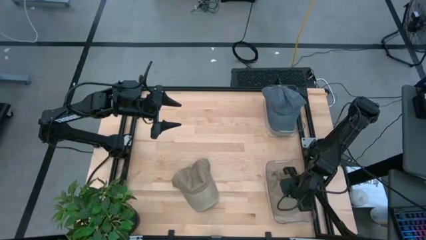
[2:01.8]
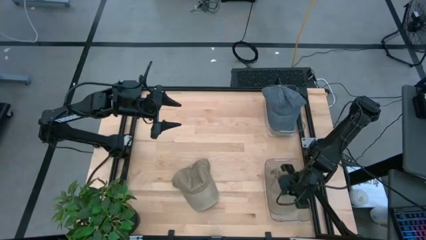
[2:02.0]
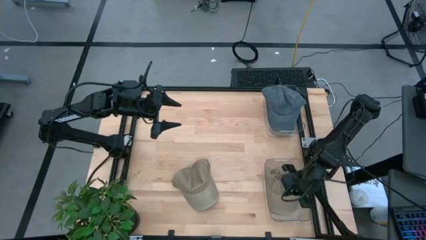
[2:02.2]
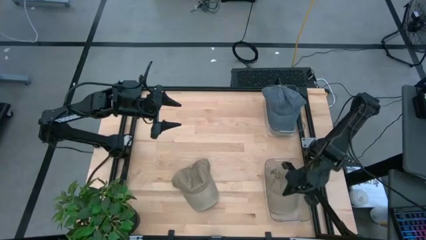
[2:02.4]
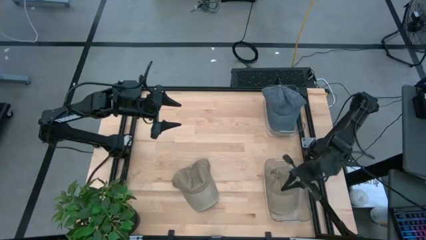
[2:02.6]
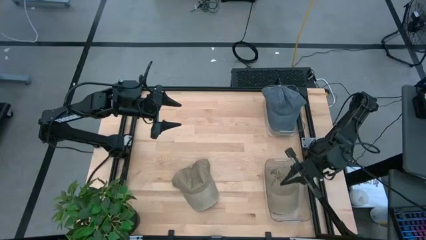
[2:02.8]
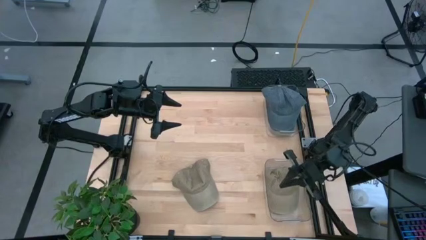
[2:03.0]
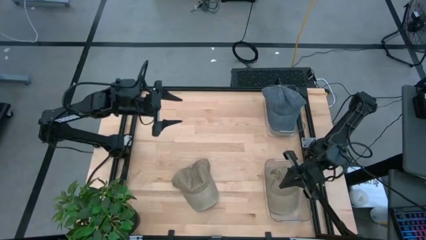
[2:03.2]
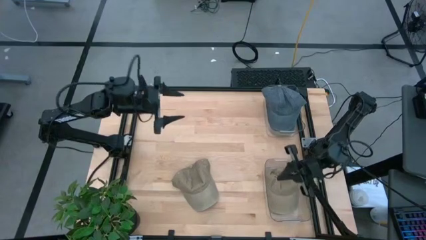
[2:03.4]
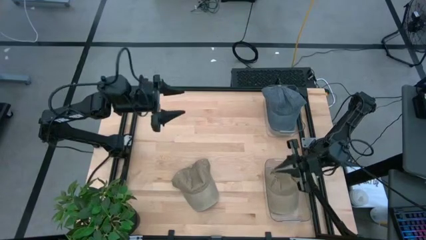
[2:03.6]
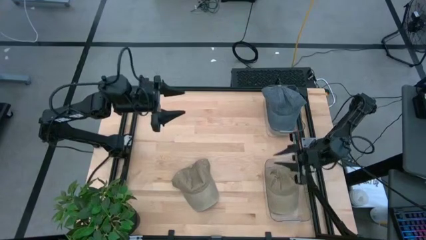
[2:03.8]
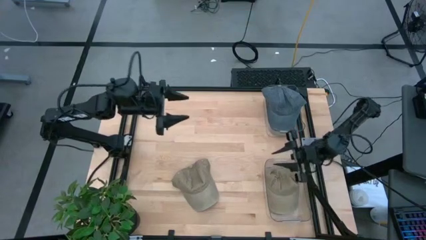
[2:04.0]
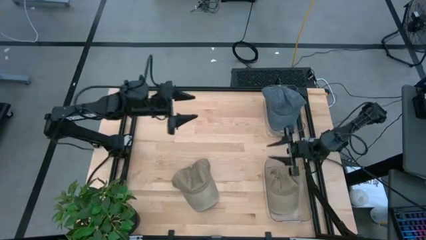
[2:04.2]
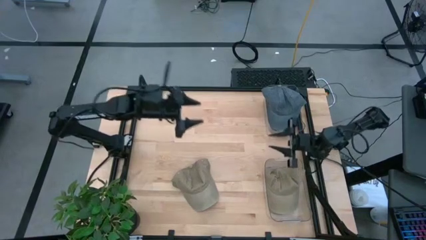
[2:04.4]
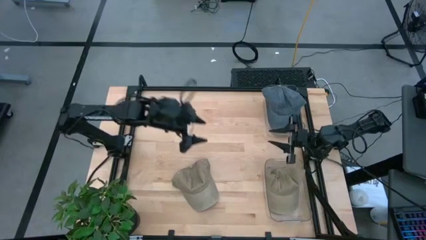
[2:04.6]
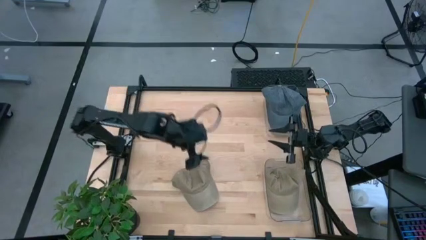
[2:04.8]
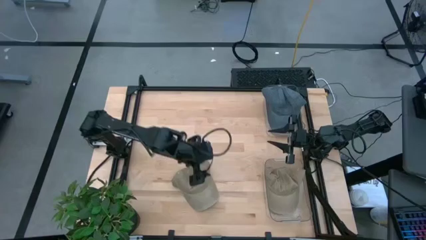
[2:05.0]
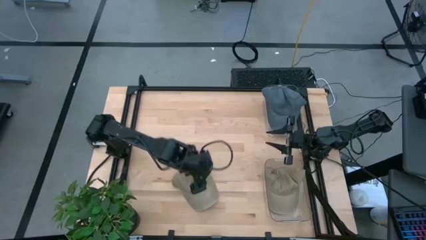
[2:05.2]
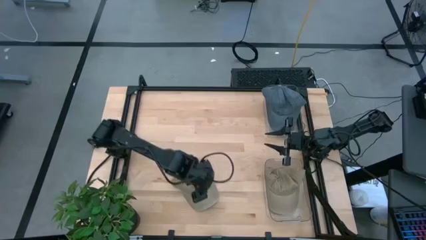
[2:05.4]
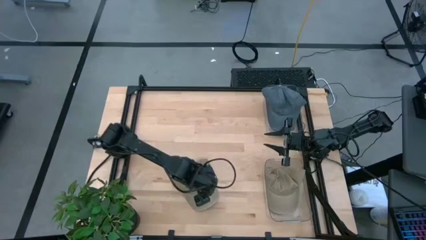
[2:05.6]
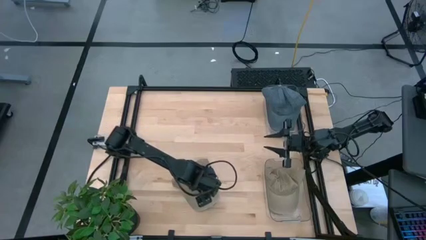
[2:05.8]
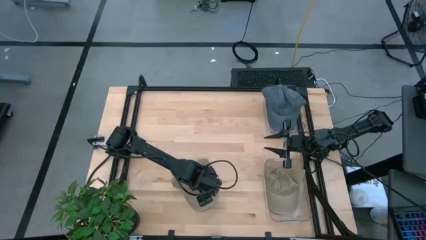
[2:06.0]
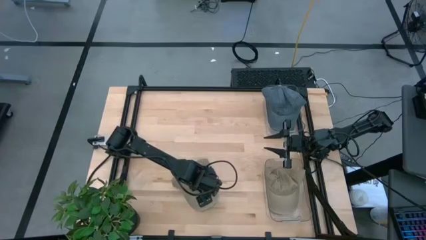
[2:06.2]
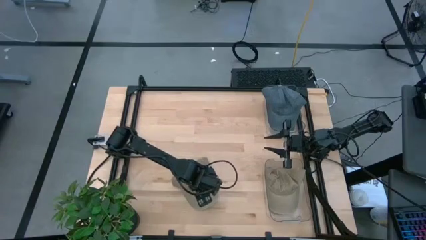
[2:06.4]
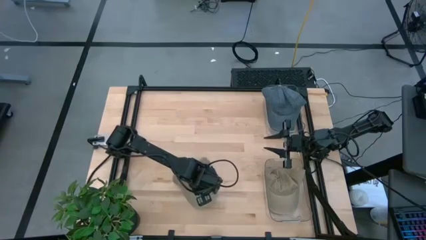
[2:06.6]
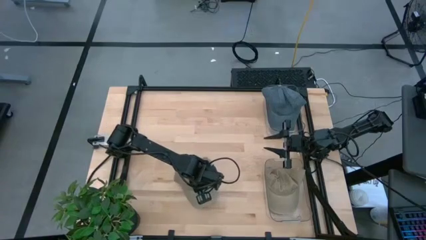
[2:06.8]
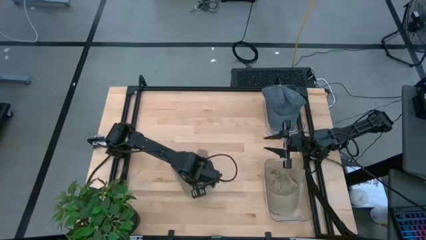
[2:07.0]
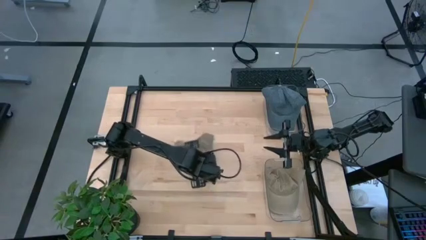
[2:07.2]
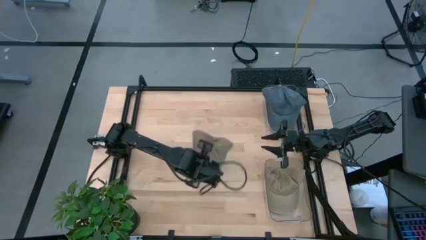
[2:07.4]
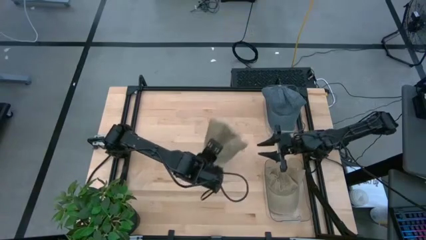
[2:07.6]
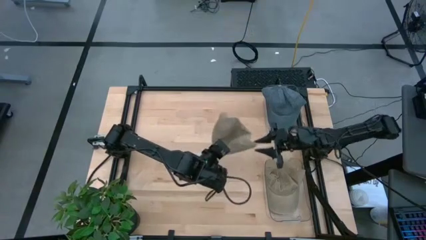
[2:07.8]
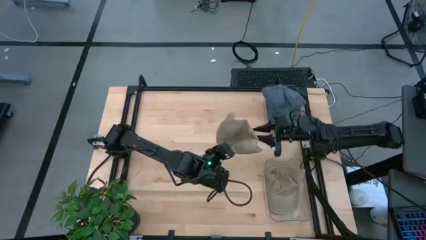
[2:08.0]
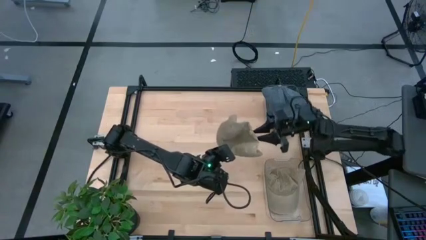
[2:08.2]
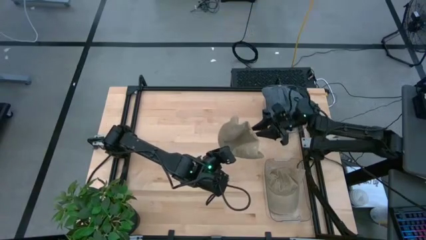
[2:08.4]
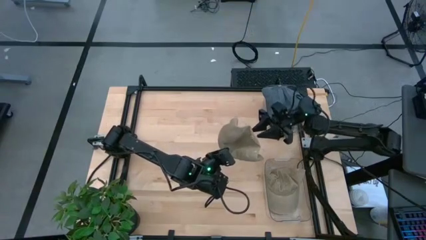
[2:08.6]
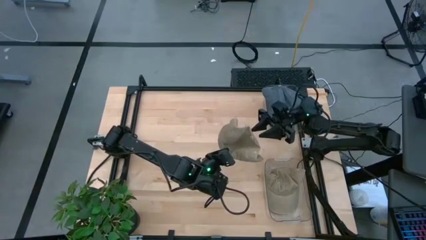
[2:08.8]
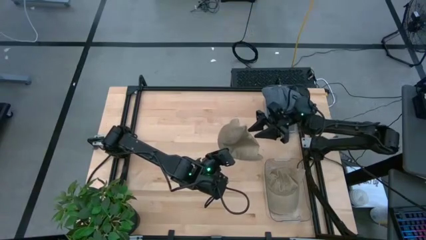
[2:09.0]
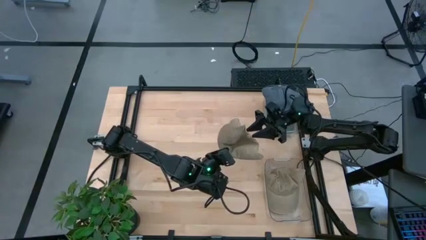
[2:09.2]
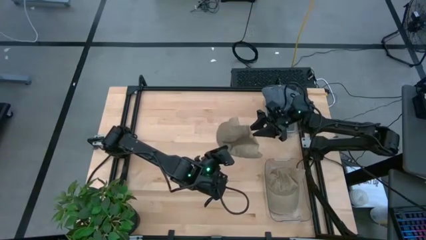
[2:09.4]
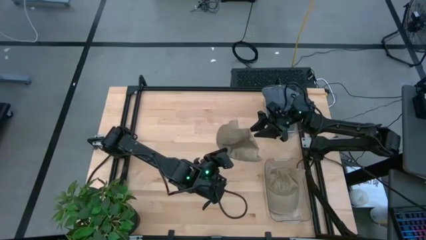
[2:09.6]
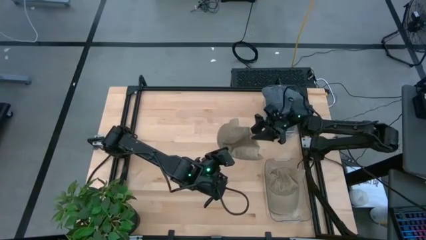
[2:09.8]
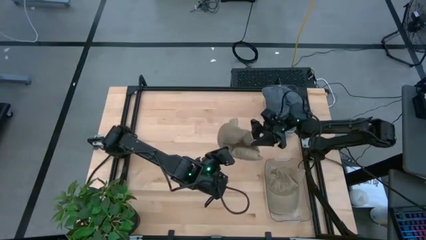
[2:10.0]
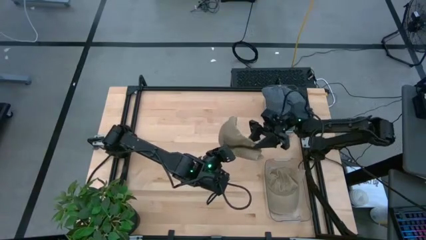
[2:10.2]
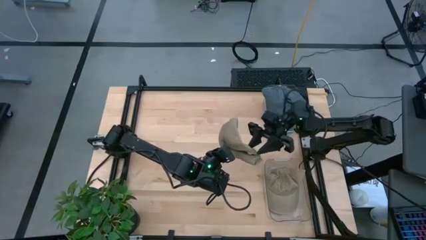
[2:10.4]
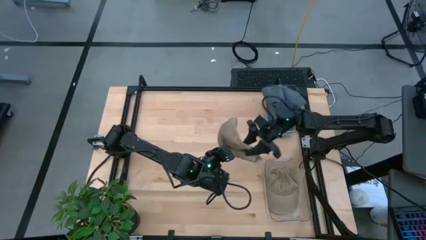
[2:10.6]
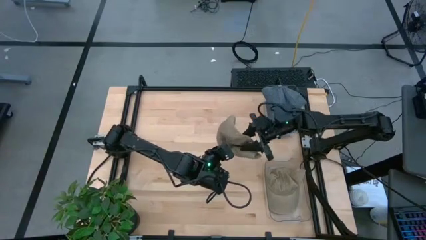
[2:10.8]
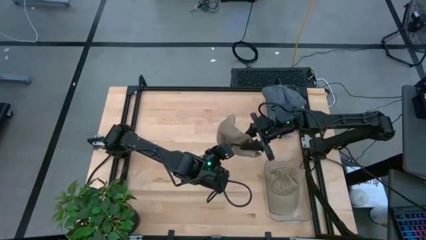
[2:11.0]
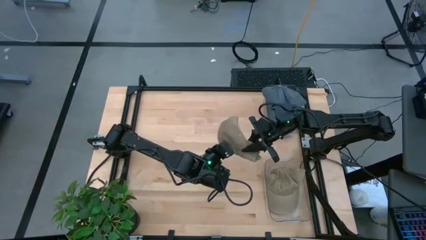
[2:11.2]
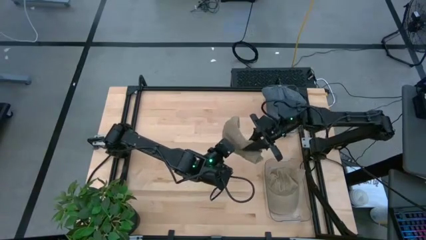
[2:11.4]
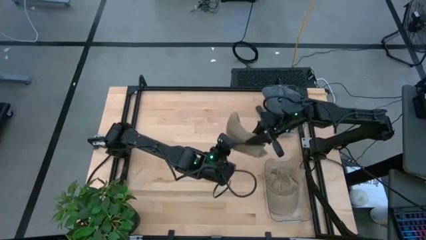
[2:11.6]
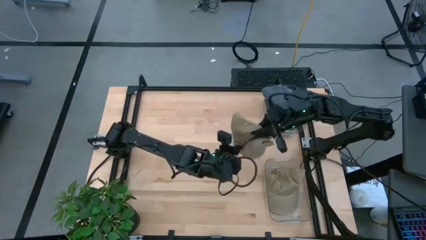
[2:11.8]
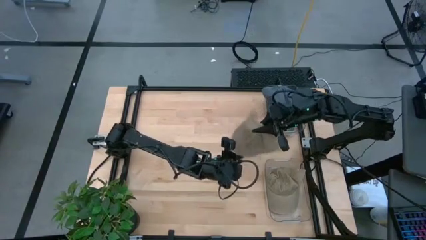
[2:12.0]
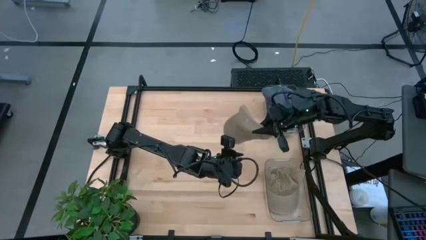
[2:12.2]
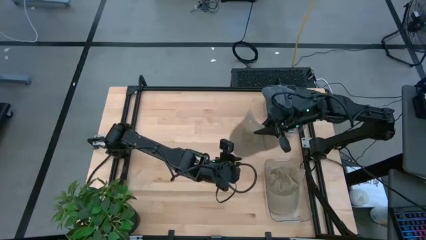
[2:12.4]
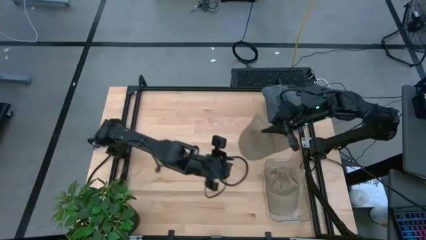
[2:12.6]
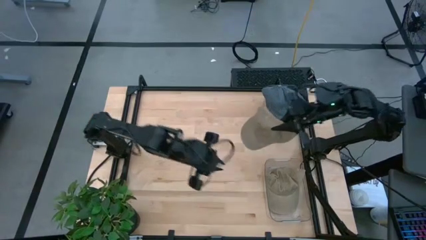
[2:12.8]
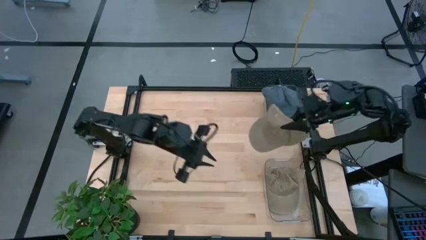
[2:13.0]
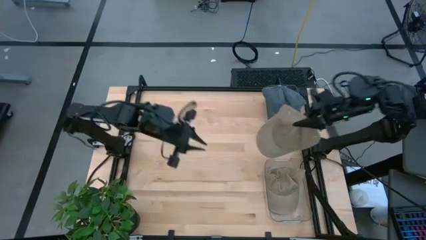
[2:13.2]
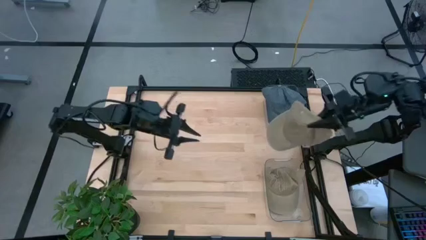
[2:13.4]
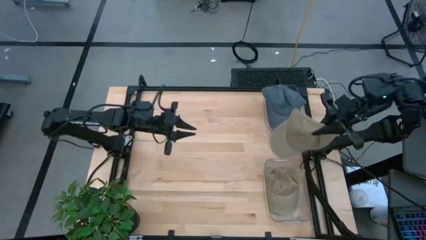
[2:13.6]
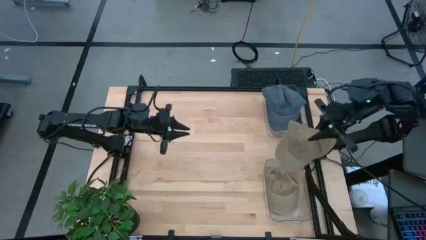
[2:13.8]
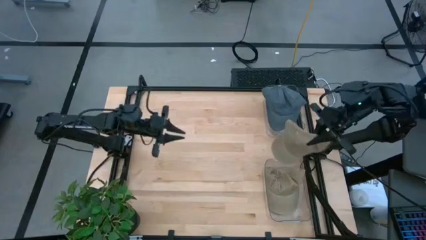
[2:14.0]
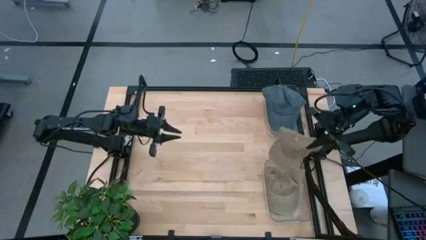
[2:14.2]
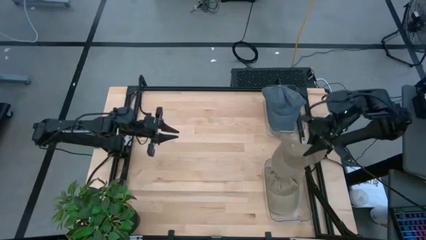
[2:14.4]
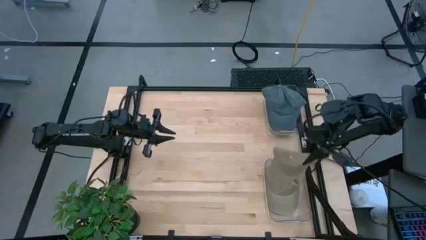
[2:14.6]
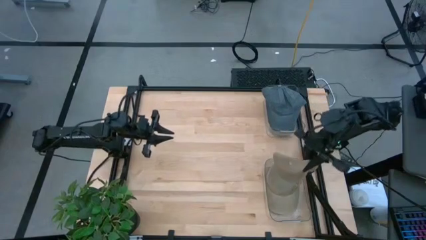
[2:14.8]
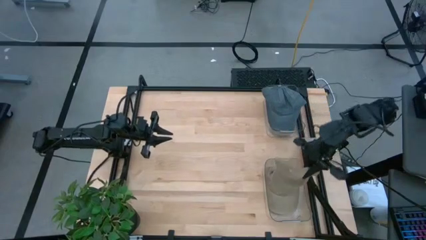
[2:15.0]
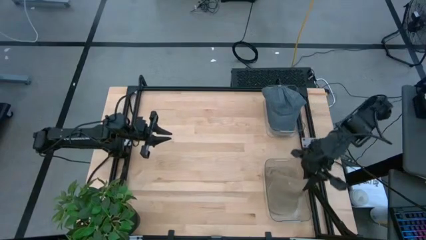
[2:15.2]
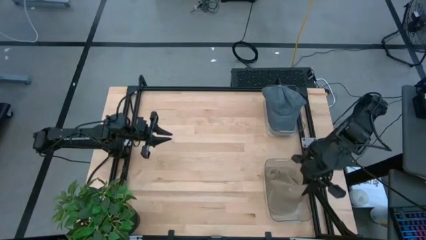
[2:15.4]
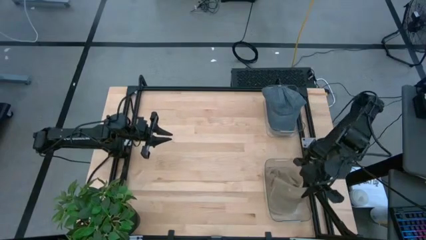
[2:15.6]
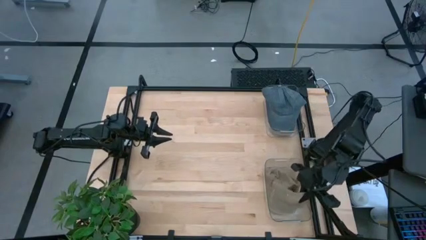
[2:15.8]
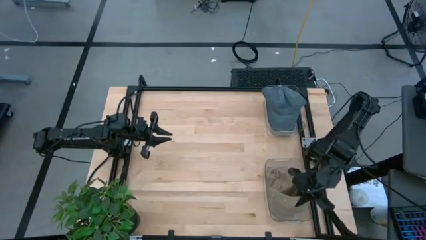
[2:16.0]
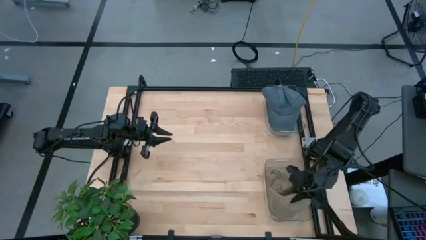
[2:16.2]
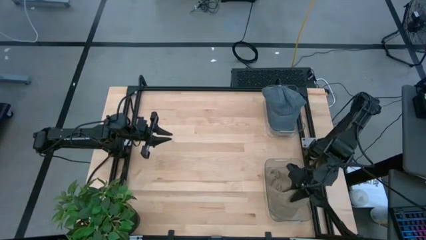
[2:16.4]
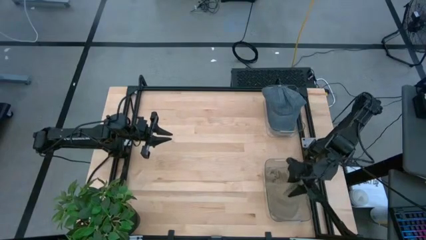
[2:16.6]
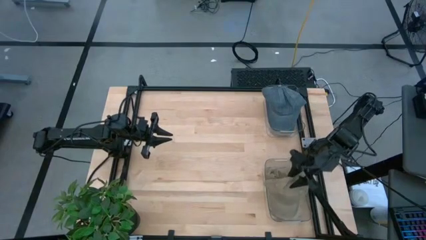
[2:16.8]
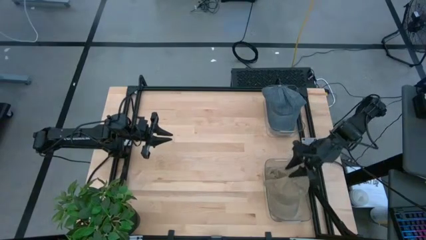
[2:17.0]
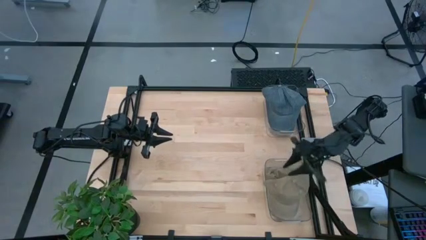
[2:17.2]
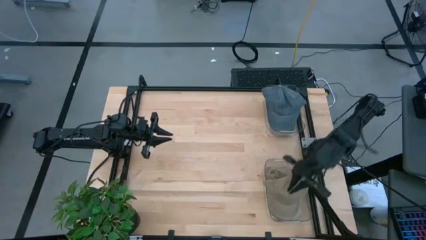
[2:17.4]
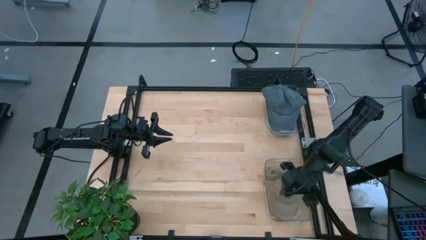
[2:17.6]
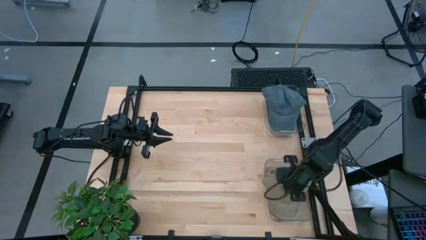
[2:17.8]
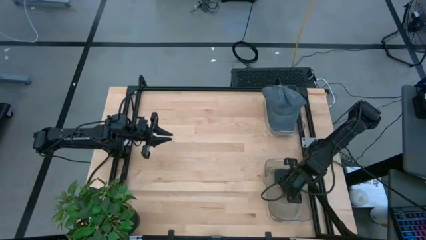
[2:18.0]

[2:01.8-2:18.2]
Task: Pick & Place hat
Put the brown and blue cap into the bottom transparent bin
